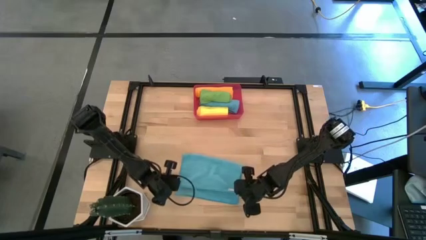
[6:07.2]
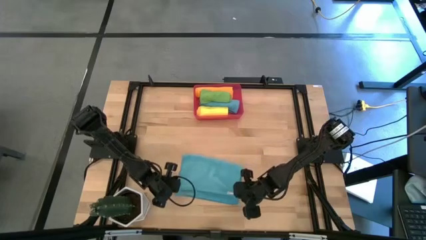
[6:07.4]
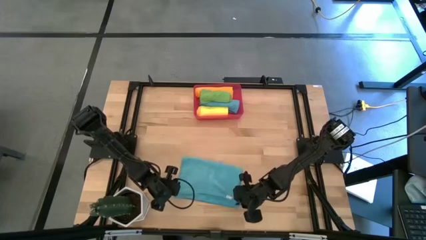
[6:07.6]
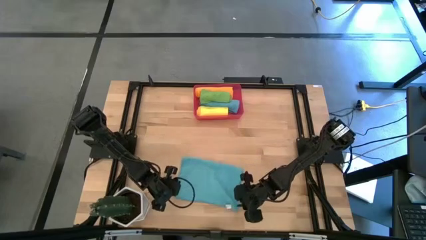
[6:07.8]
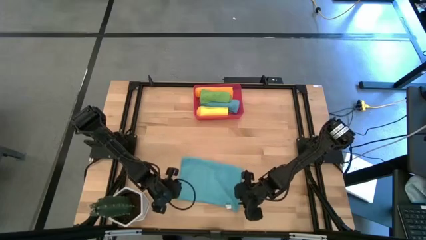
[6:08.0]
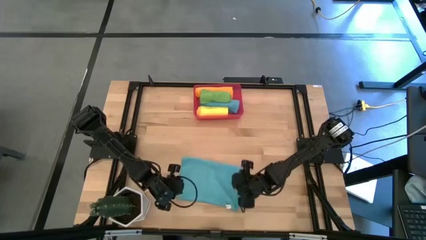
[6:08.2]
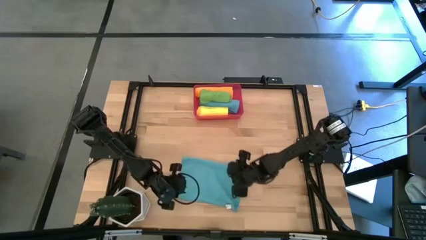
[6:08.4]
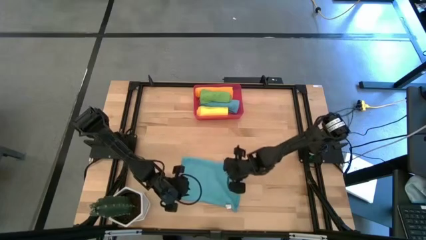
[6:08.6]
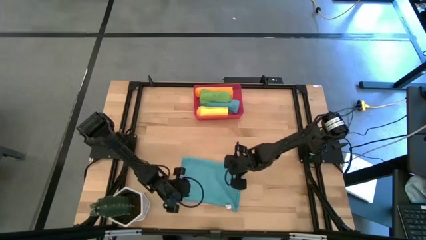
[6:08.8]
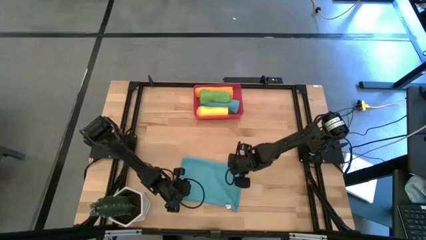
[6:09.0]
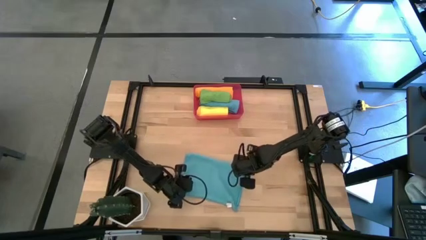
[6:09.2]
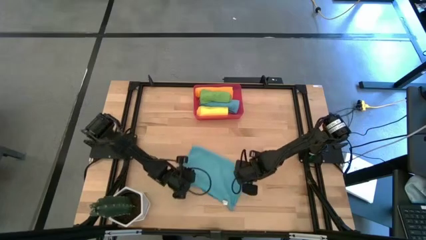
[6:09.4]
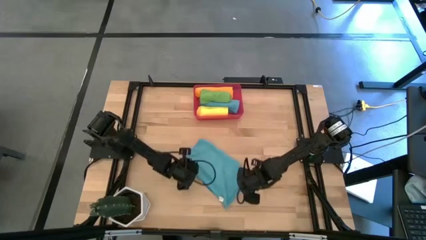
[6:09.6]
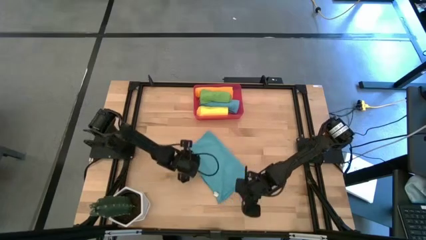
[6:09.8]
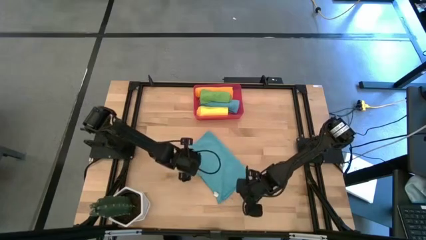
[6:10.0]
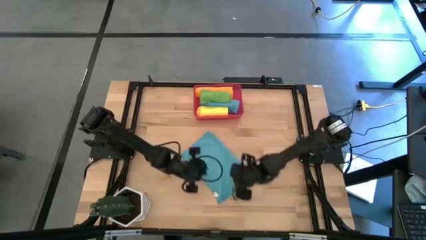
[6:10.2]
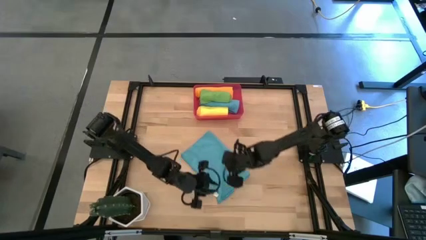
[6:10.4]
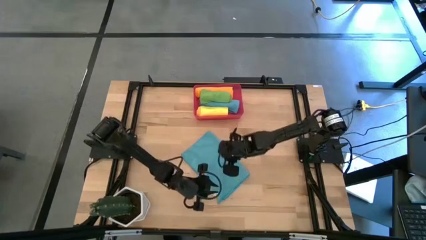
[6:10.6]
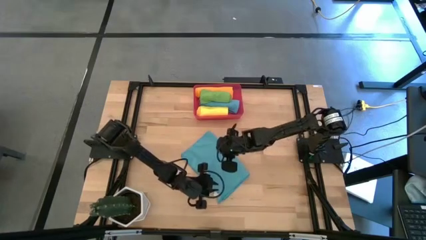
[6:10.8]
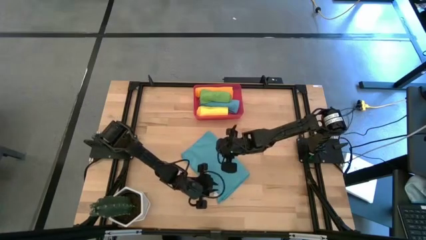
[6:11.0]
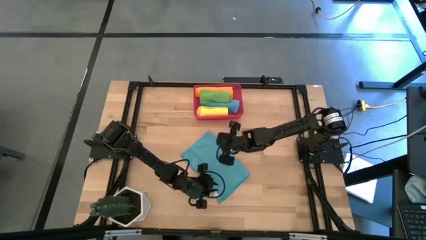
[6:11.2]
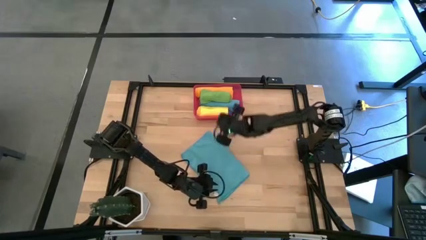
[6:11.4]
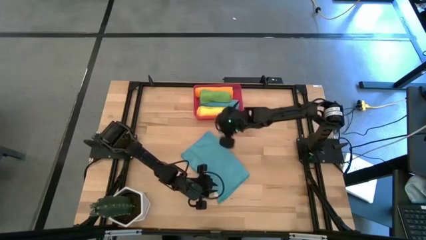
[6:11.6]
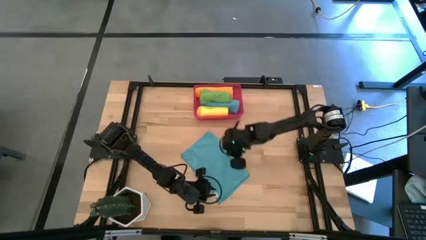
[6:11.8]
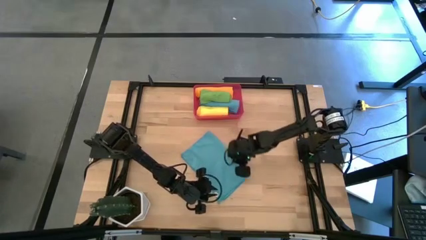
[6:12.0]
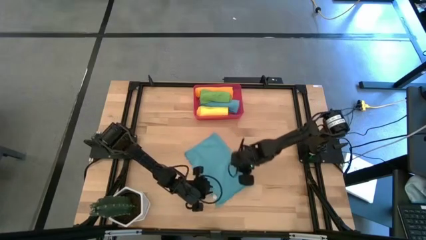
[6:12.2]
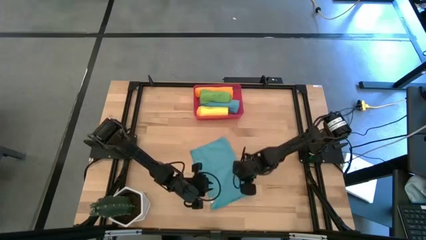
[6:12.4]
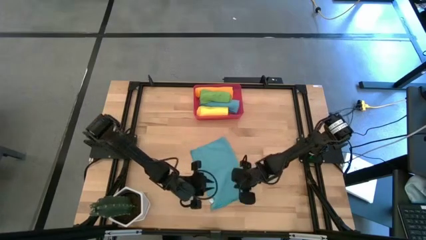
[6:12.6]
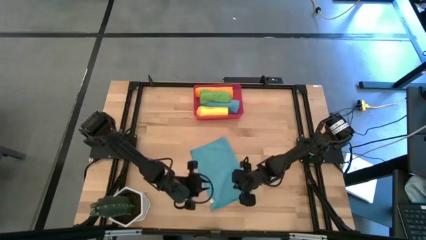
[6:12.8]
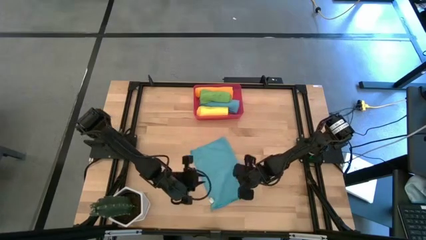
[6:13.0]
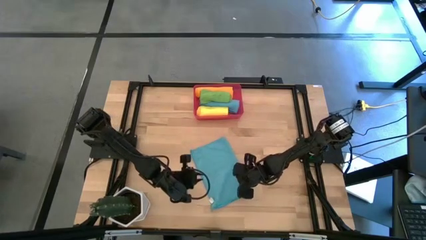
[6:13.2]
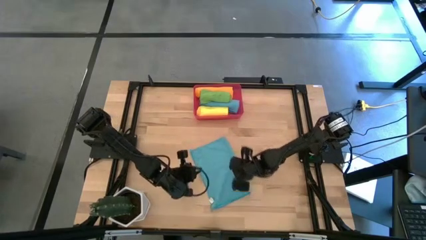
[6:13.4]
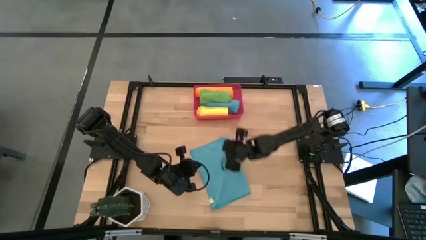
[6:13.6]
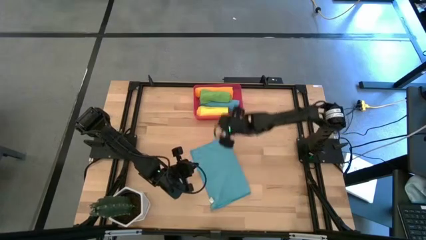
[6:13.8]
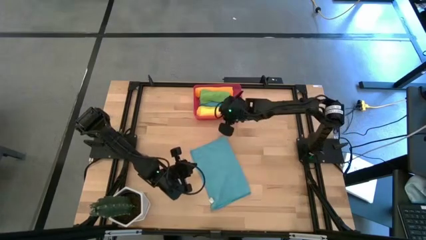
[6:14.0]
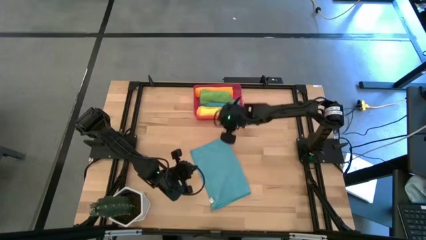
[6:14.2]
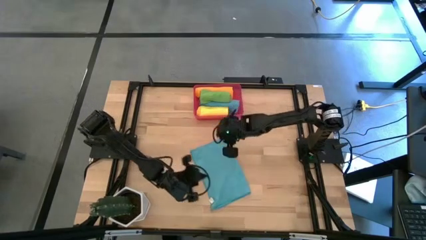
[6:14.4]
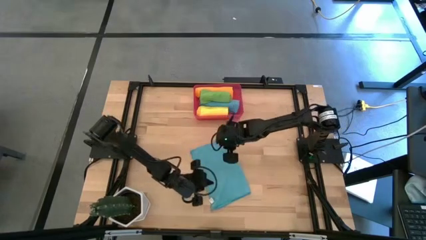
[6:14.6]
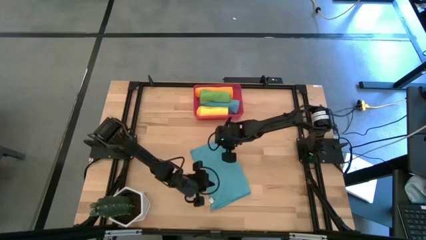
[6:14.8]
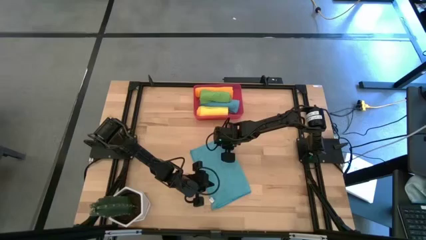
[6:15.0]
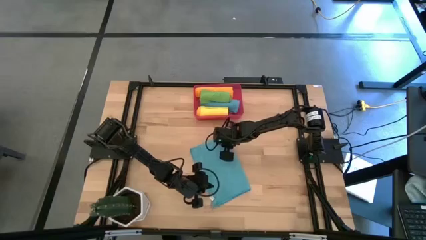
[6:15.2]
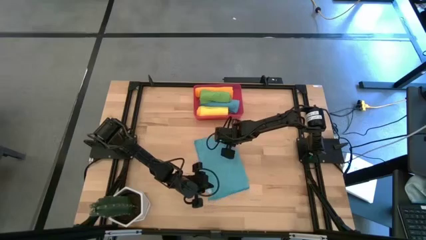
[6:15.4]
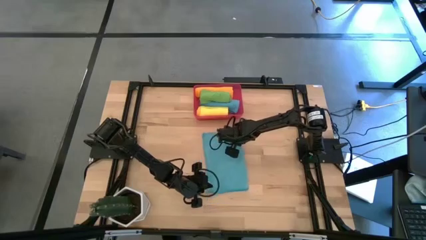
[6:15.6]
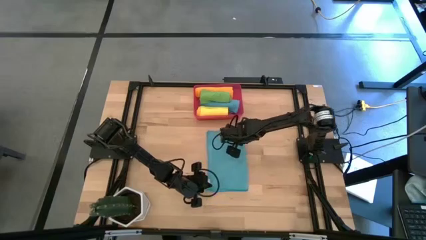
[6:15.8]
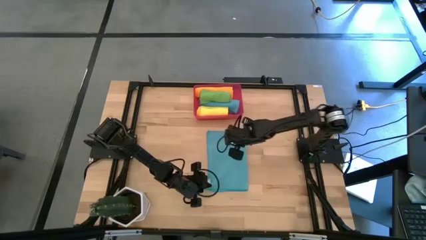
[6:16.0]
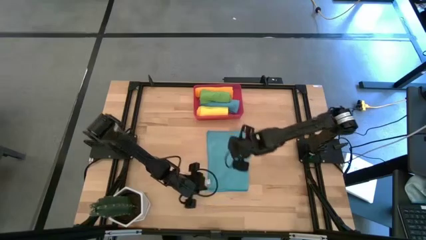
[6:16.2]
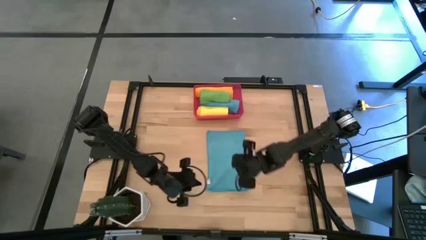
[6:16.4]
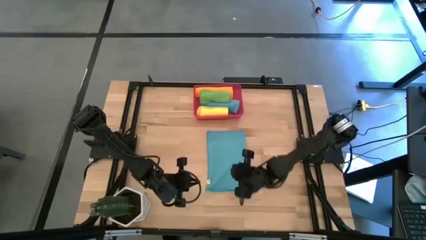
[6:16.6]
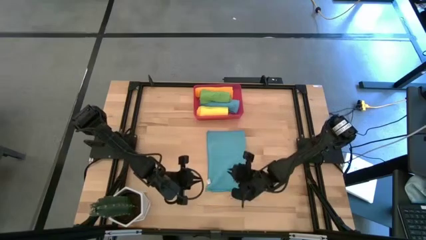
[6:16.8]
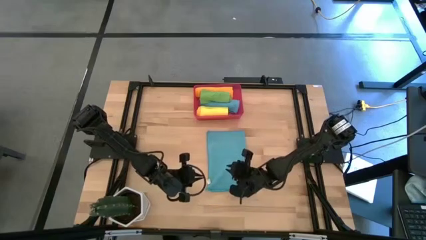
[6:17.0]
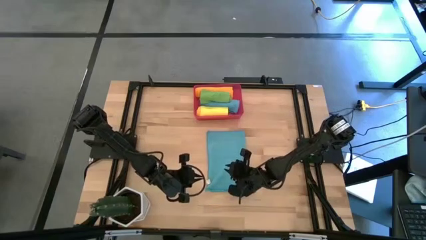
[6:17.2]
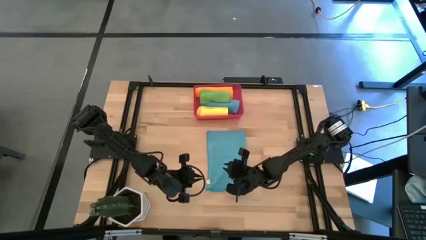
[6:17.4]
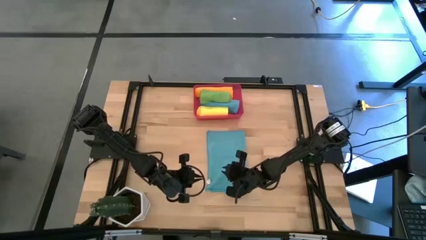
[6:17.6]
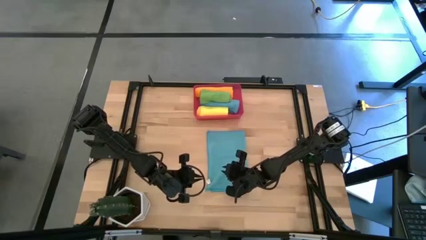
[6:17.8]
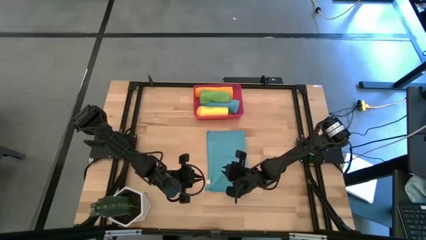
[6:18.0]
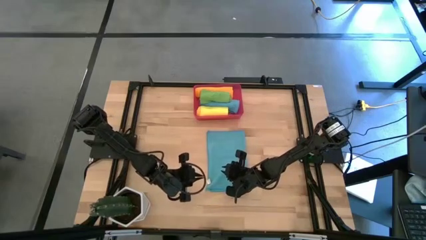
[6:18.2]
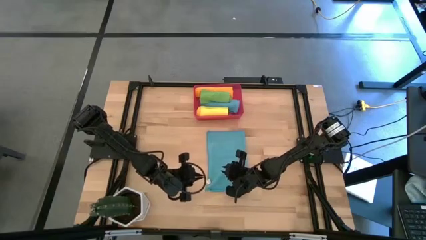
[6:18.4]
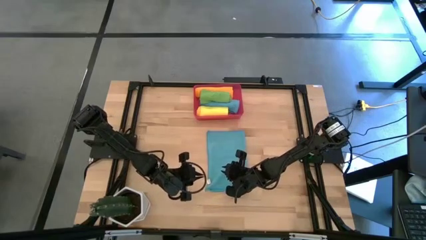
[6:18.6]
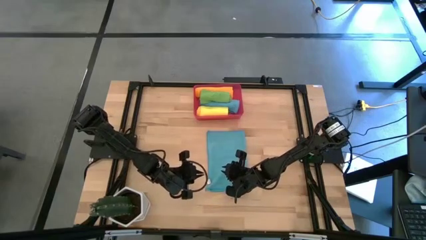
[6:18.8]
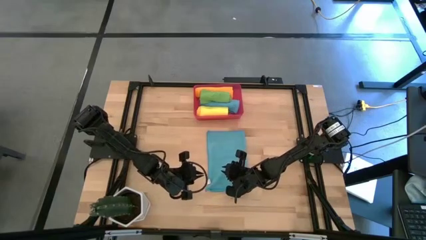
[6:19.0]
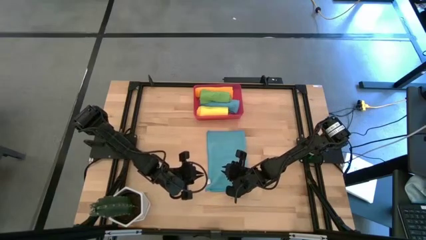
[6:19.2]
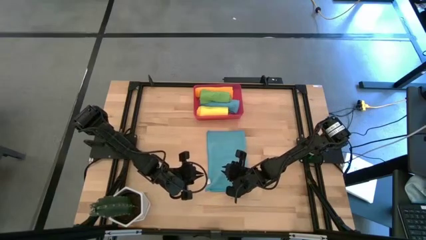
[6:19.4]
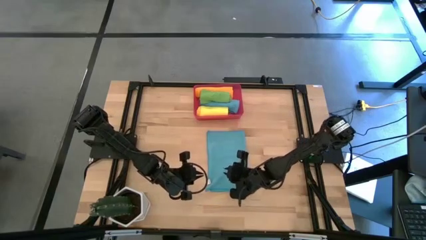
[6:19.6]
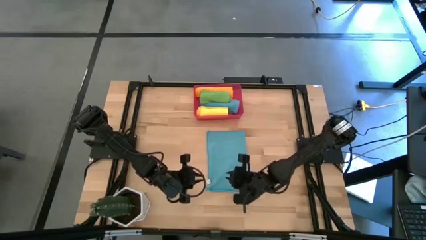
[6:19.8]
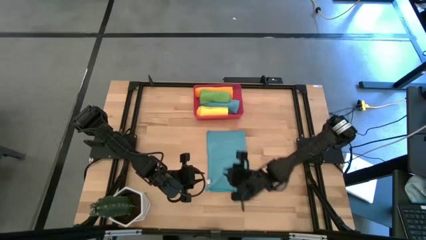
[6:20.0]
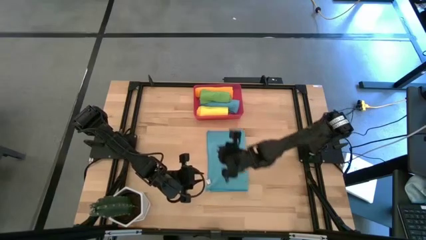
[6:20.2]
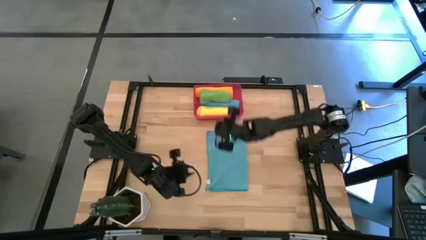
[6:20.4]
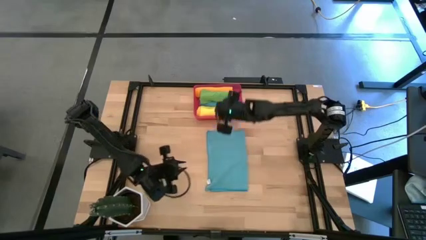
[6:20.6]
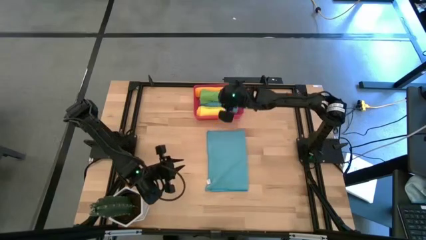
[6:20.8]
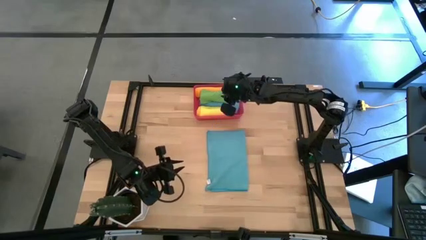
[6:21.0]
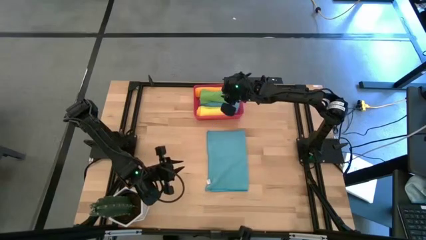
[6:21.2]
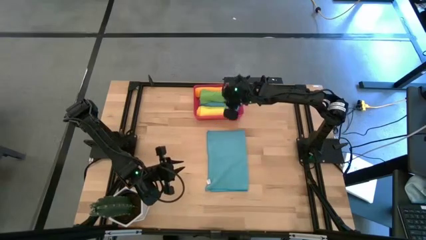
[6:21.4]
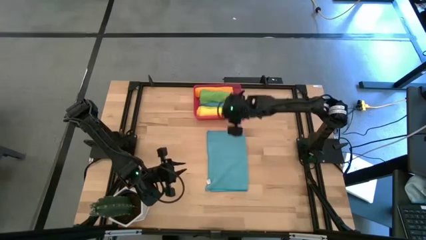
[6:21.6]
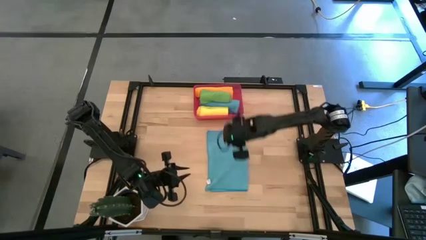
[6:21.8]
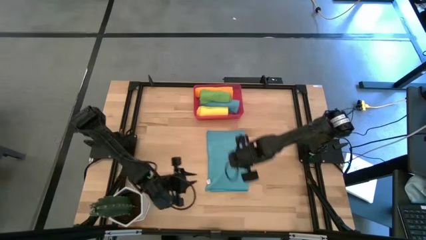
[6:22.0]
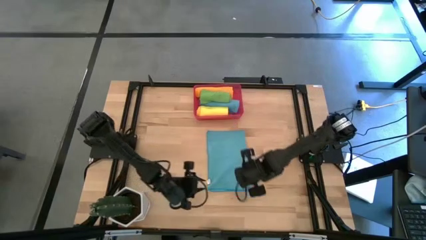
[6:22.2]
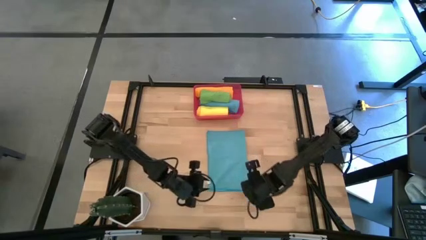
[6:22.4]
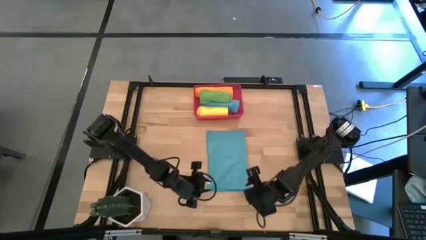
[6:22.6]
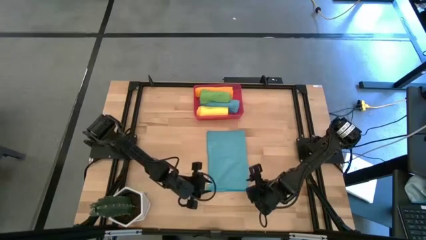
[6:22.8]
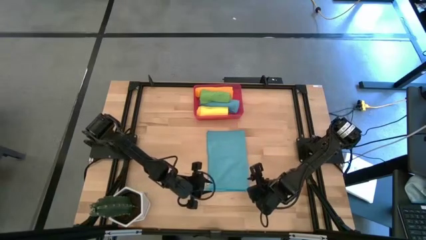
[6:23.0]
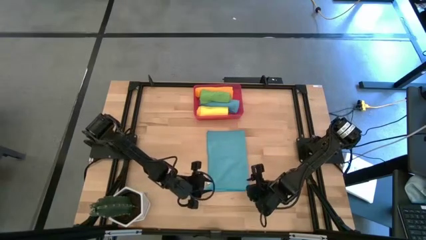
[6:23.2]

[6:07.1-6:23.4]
Task: Roll microfiber towels into tight, uniform cylinder then place into a basket
Roll the blue microfiber cloth
